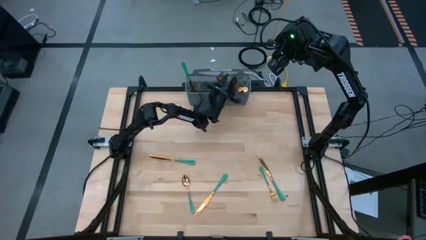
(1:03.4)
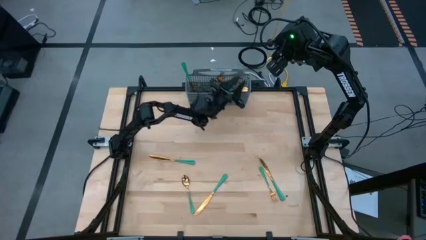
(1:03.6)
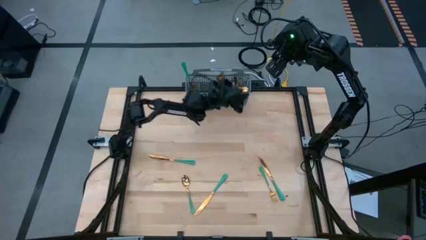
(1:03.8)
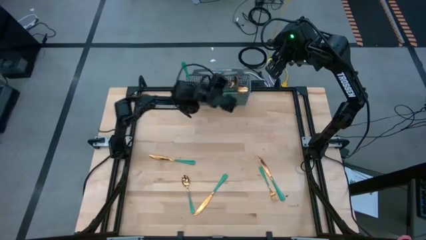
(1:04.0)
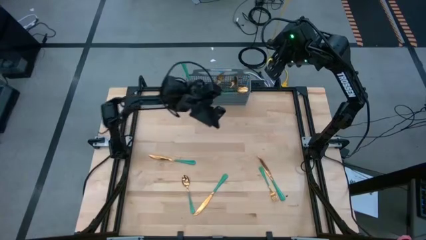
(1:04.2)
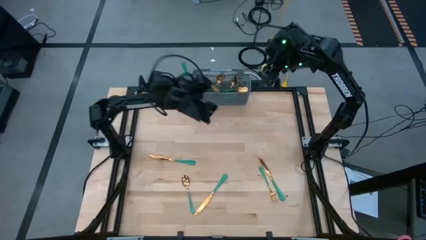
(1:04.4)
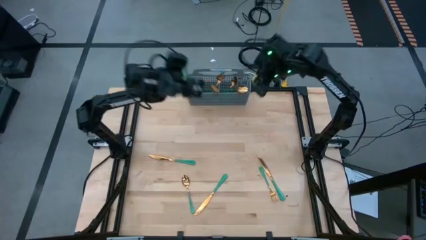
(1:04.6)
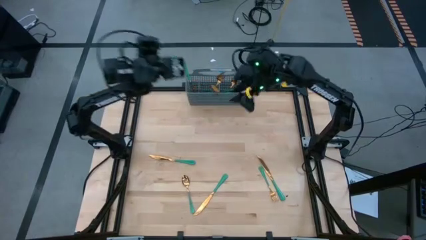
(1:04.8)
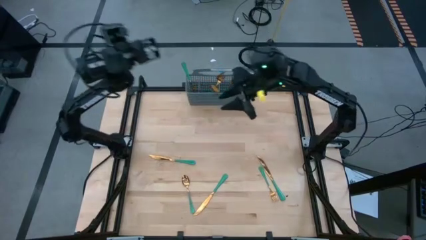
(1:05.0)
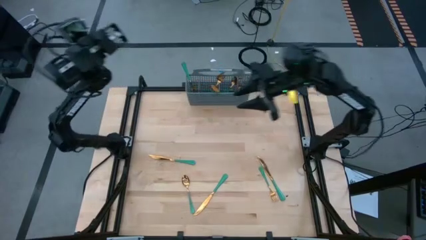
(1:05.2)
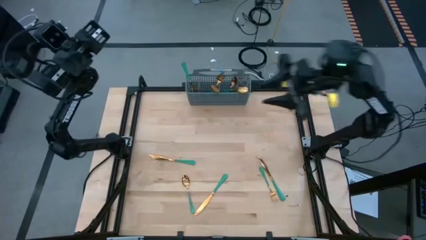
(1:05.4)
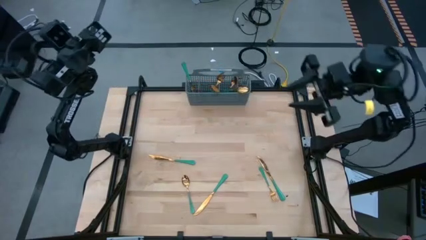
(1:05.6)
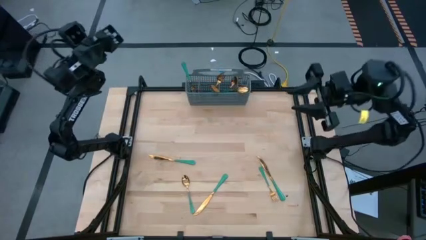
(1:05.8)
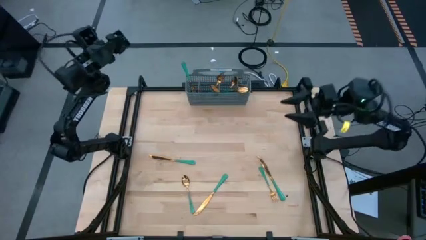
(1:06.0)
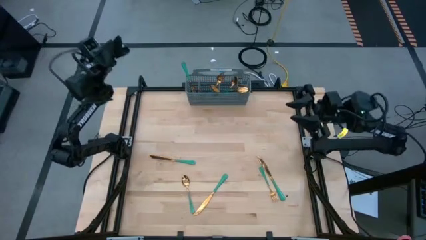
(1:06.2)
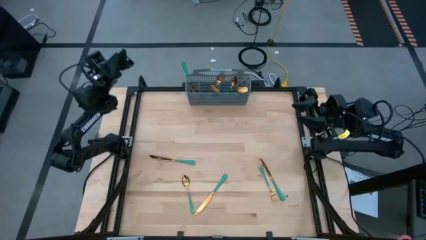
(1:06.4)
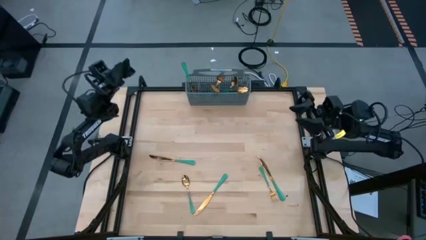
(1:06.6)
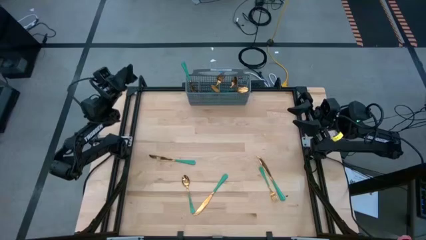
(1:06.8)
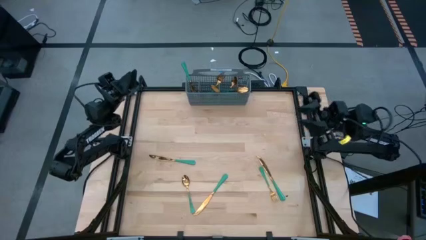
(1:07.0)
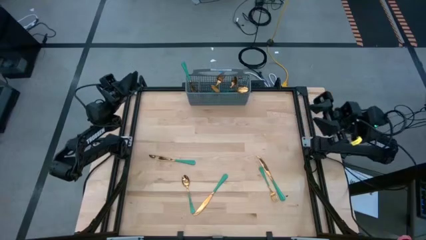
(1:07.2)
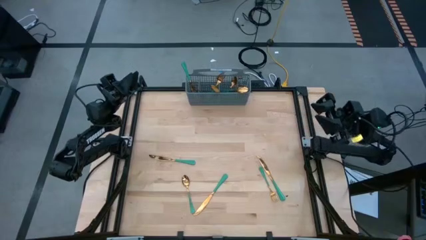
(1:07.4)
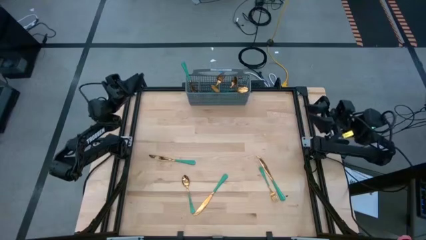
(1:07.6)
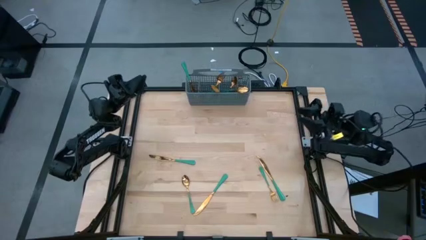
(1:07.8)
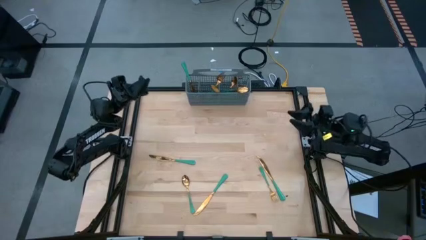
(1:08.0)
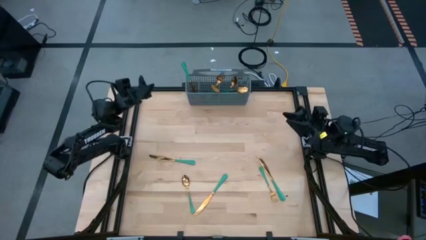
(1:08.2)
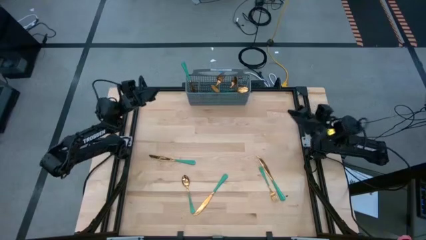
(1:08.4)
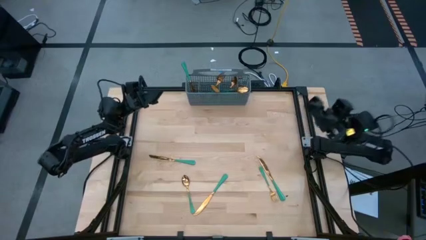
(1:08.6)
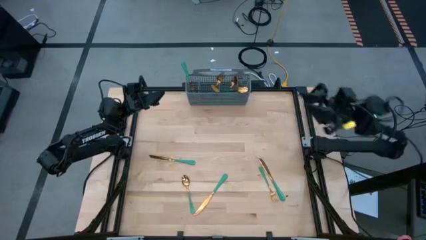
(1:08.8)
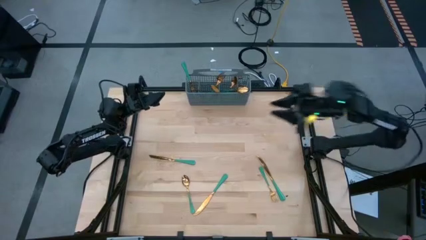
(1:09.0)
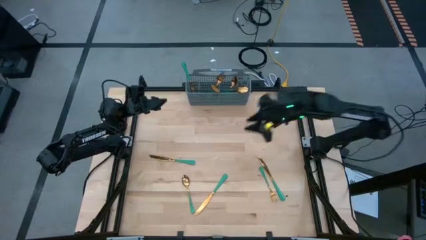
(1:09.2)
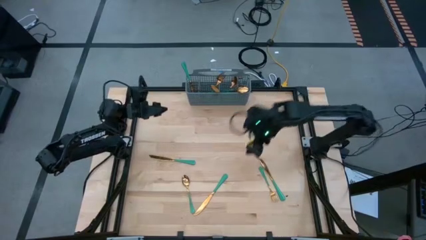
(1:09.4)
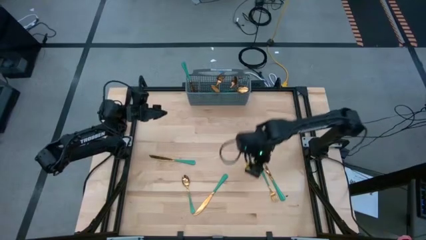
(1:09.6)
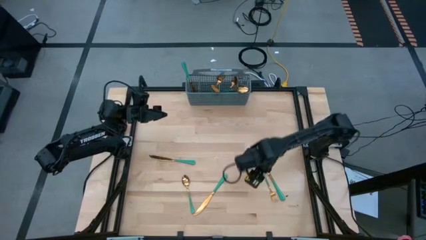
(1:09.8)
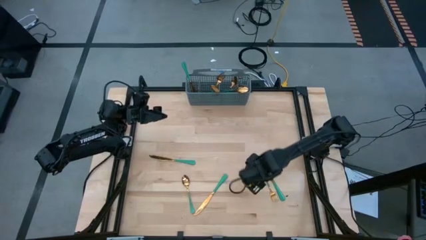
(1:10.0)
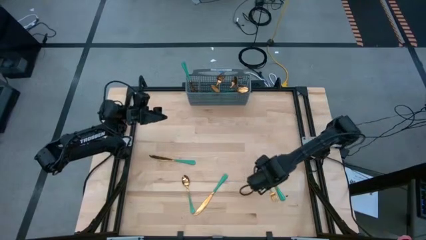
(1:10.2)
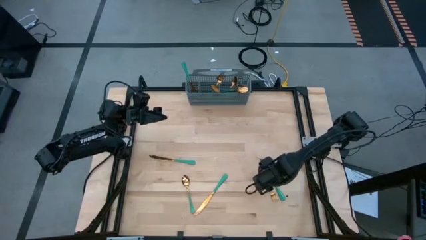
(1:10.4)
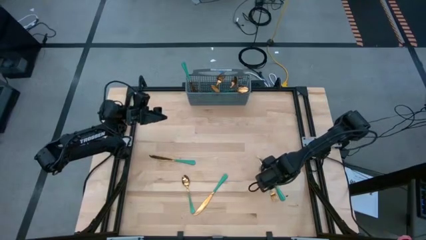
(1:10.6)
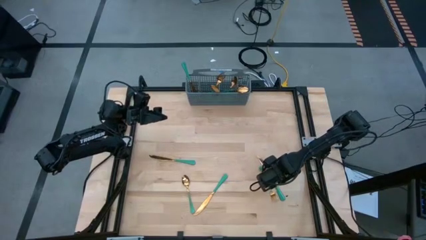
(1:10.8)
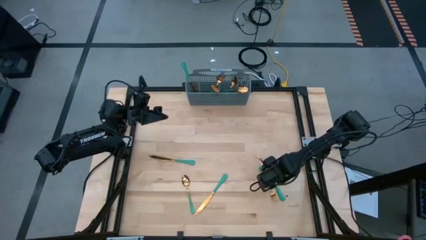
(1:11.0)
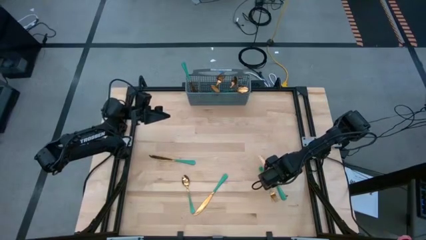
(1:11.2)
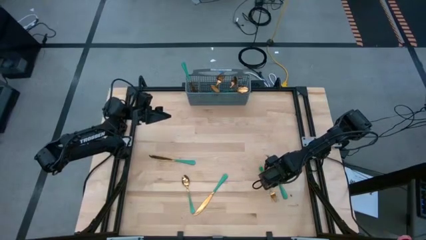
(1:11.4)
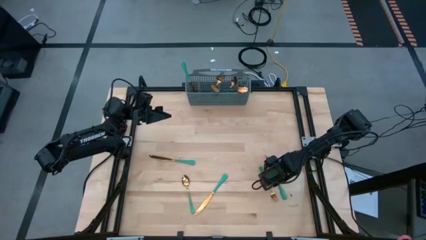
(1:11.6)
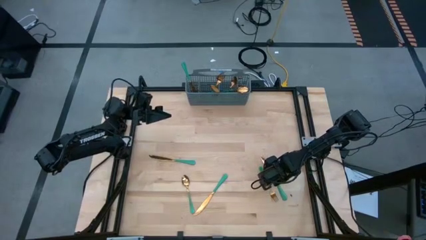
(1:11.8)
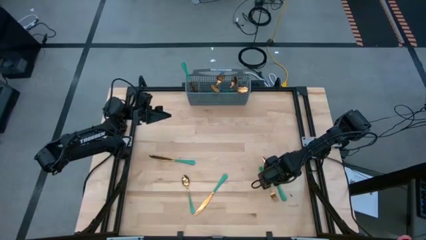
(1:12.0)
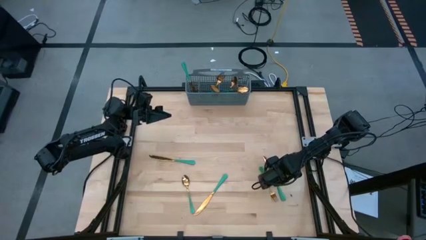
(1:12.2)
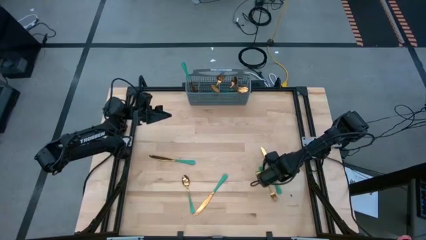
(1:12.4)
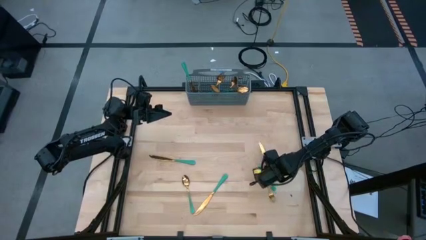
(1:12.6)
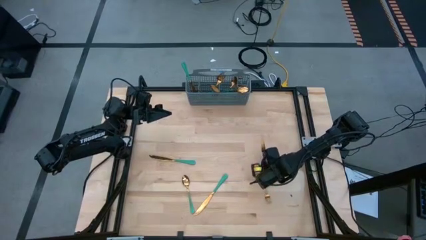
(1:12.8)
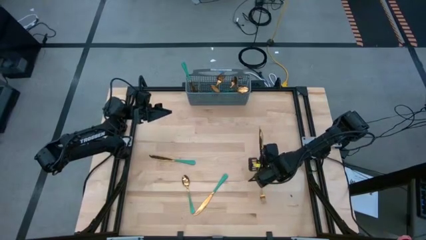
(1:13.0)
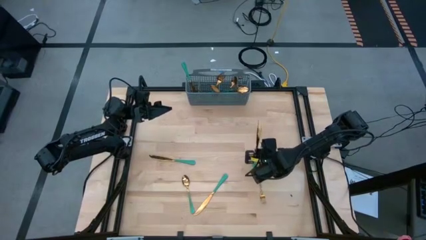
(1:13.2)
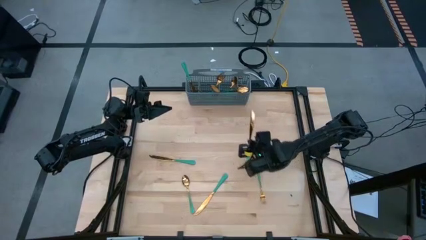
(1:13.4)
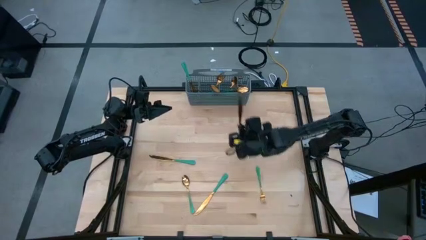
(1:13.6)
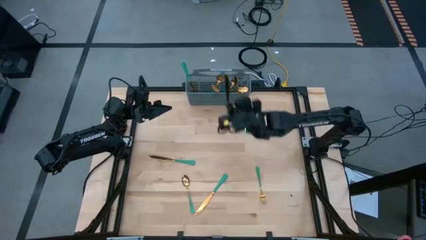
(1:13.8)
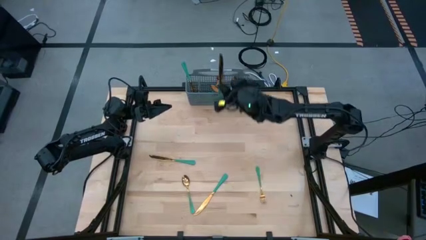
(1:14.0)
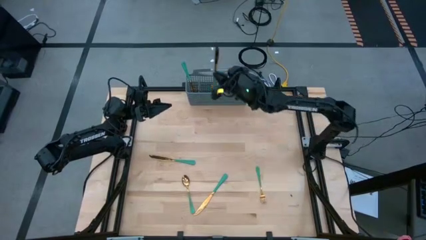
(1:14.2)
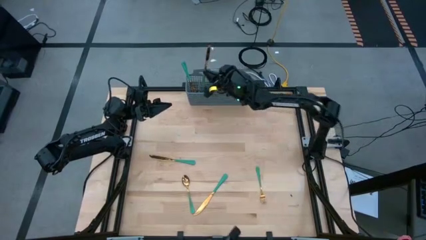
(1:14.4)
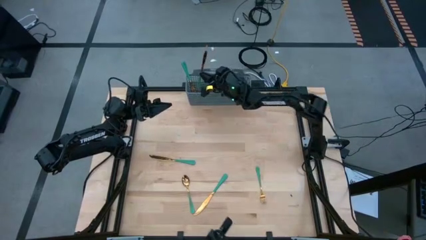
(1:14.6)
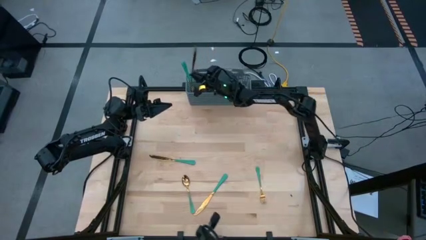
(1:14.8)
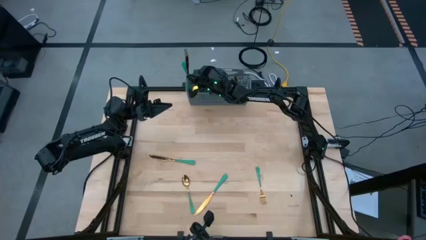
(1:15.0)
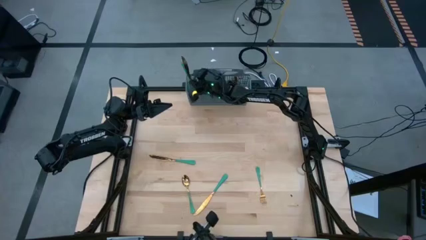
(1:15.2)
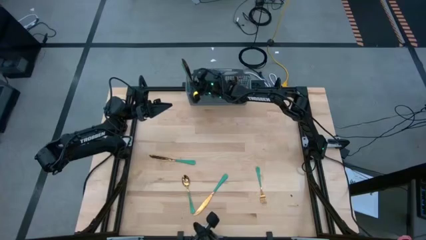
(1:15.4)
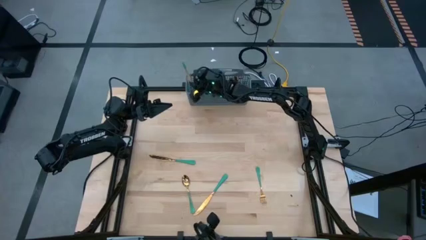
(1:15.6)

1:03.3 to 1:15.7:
Task: Sort silverware
Put the green knife into the gray silverware organizer

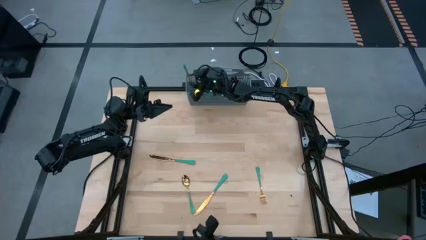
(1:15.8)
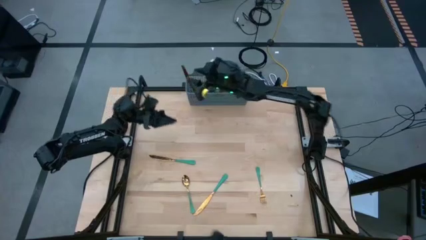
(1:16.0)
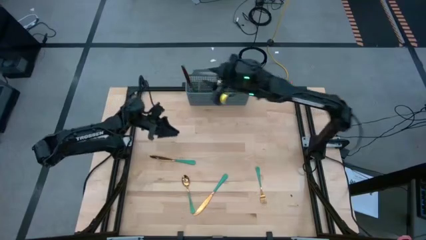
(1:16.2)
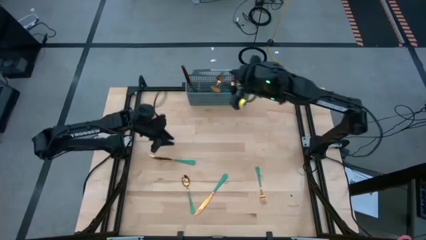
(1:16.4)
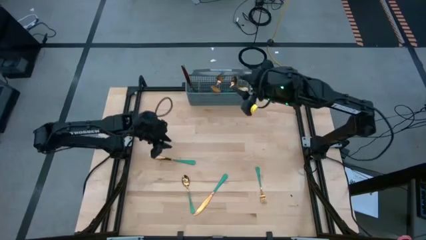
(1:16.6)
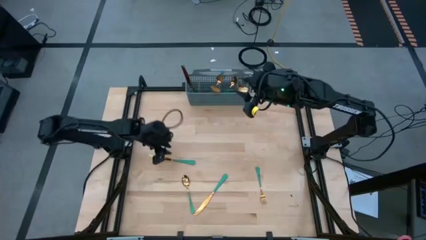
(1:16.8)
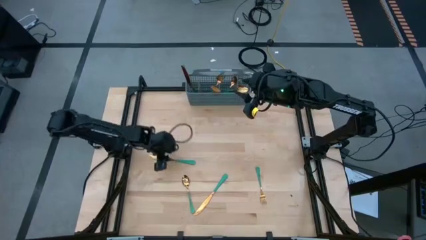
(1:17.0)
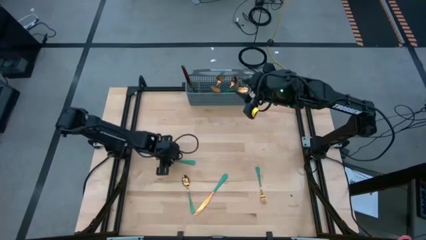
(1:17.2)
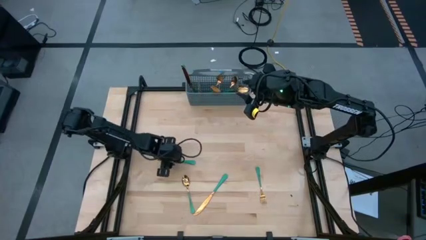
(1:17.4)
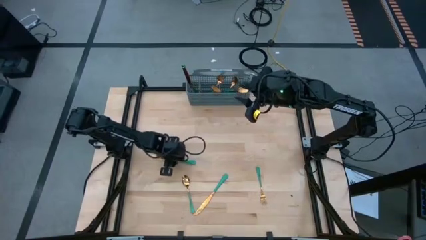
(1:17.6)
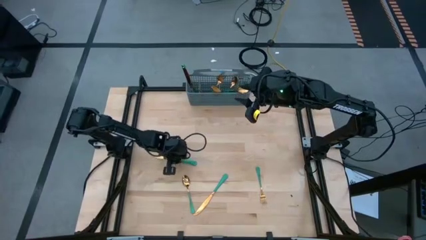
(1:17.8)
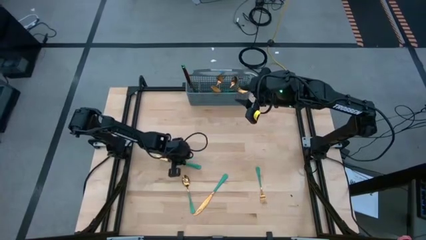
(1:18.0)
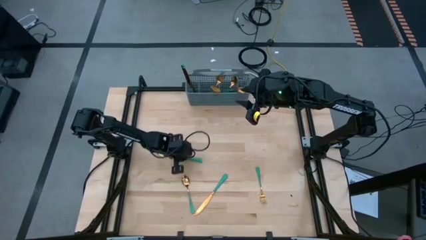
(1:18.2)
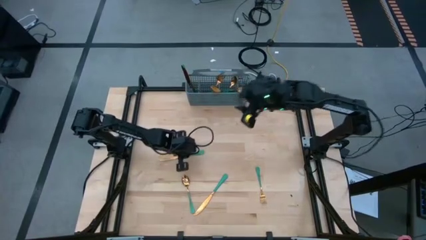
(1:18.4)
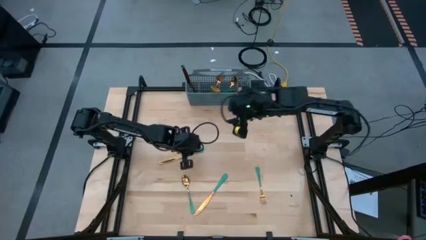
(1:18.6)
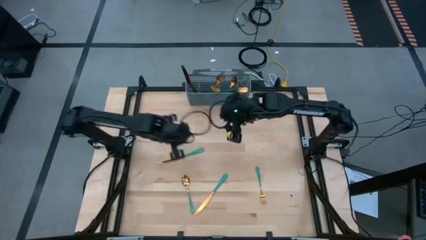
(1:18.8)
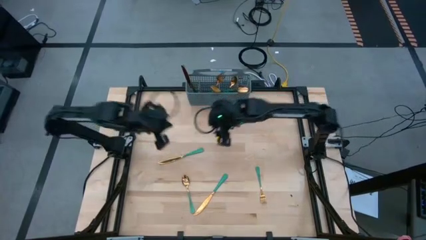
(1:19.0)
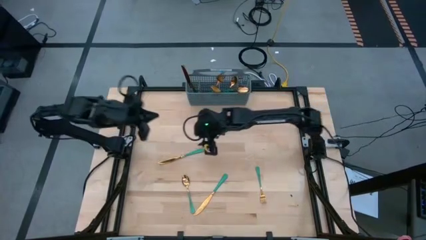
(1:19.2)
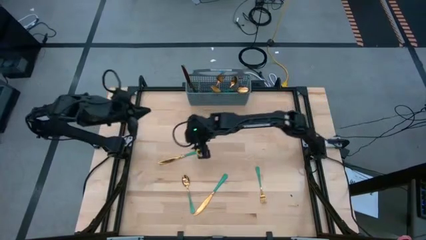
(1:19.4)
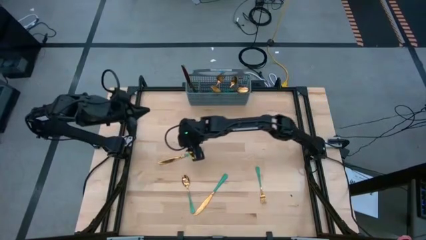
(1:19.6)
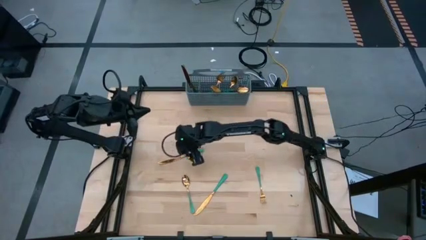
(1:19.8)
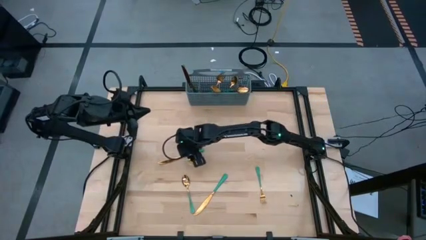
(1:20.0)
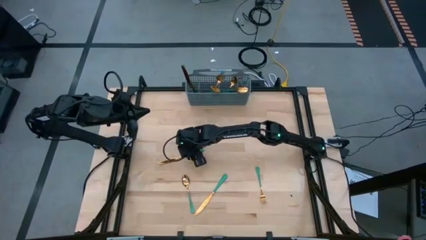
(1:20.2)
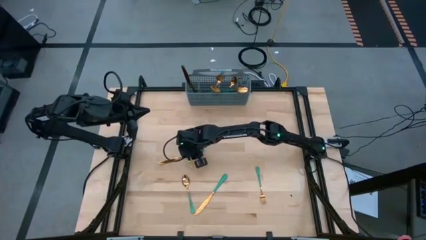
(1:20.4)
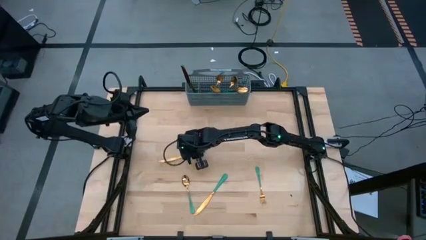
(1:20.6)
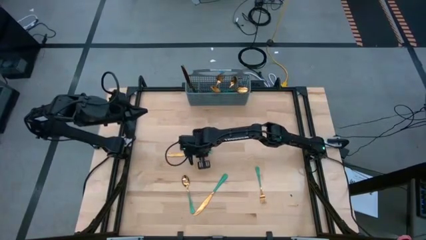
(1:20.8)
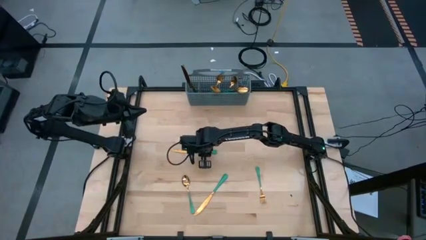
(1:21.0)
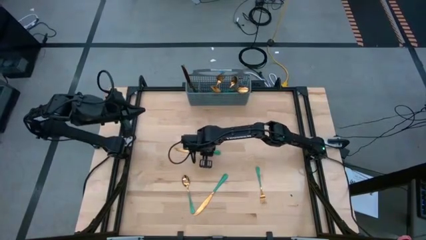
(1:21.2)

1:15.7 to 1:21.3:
Put the green knife into the gray silverware organizer
